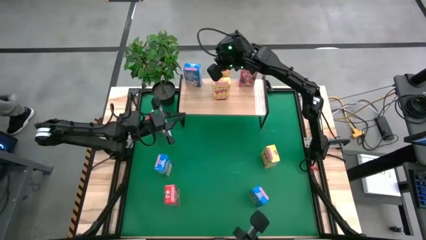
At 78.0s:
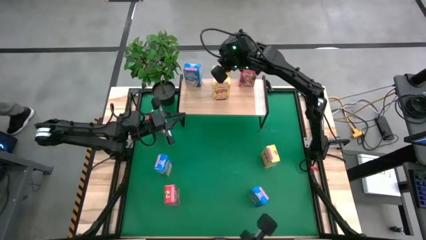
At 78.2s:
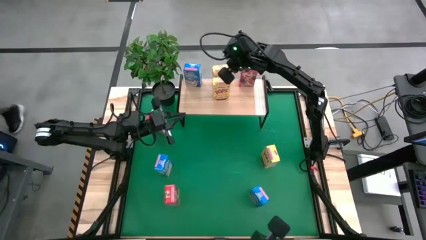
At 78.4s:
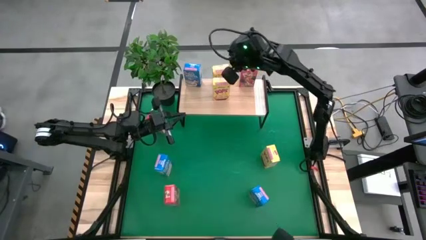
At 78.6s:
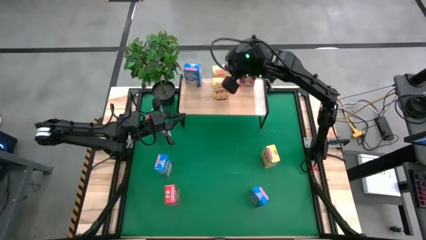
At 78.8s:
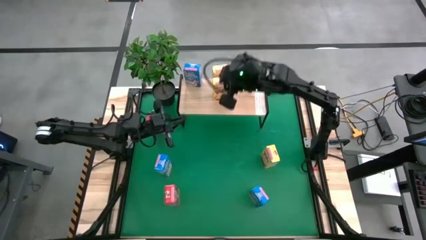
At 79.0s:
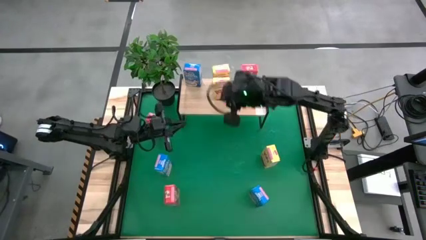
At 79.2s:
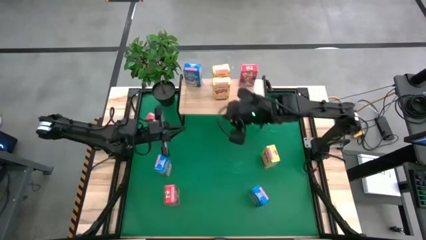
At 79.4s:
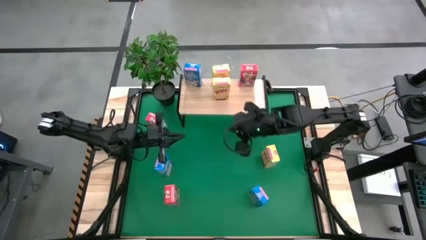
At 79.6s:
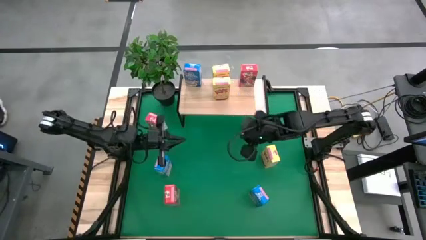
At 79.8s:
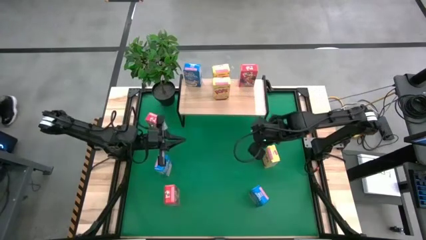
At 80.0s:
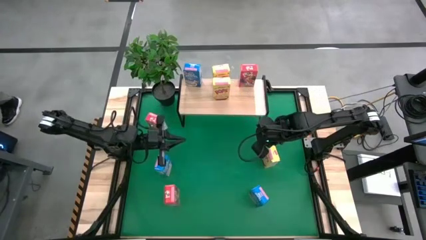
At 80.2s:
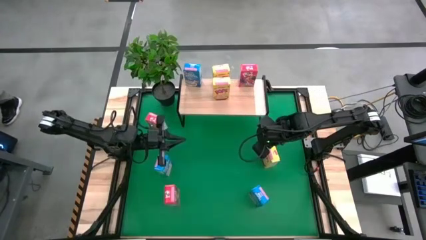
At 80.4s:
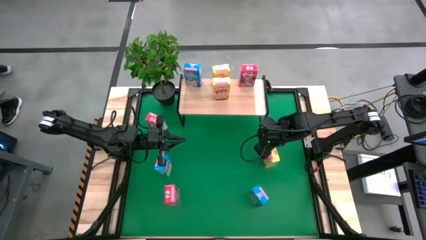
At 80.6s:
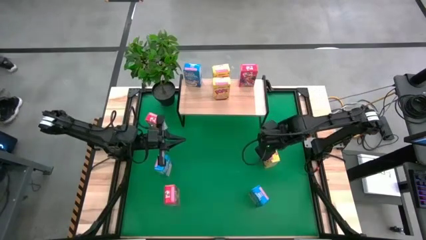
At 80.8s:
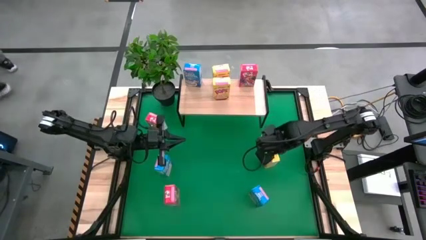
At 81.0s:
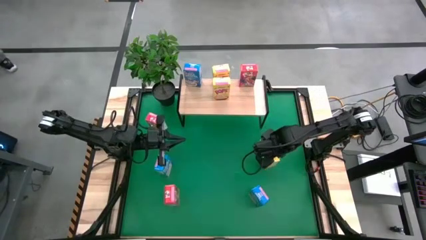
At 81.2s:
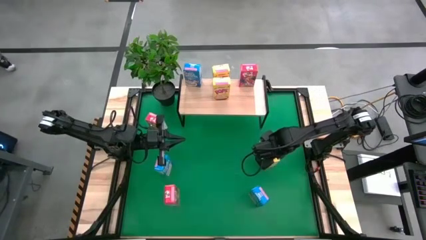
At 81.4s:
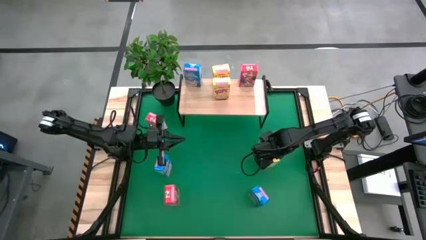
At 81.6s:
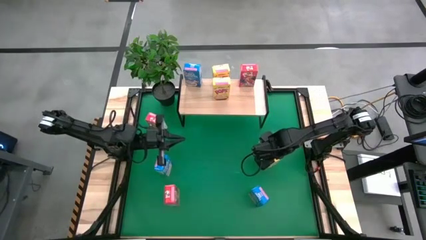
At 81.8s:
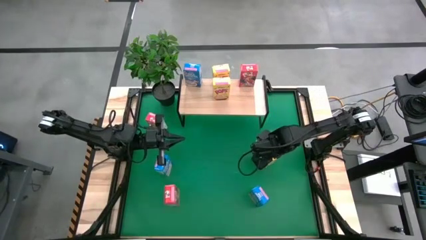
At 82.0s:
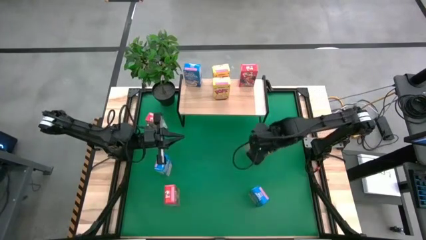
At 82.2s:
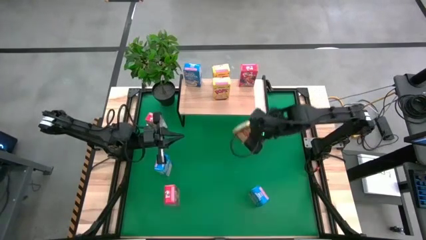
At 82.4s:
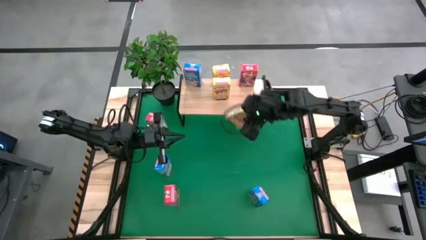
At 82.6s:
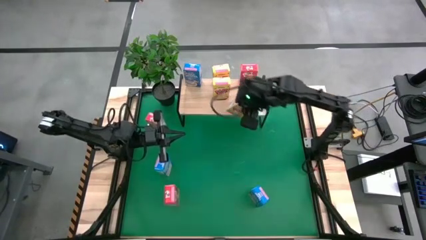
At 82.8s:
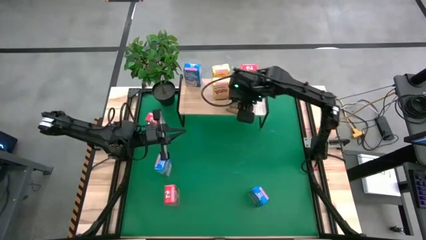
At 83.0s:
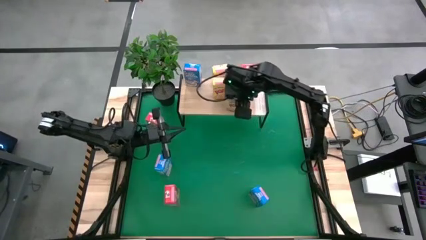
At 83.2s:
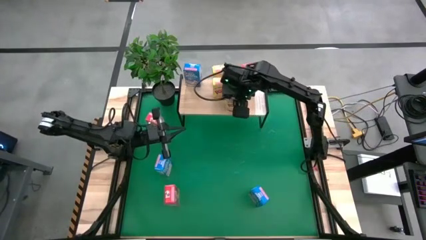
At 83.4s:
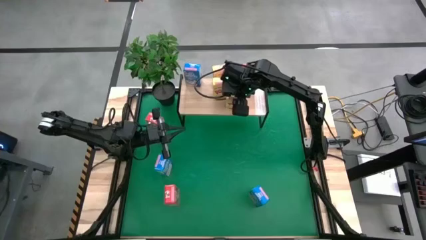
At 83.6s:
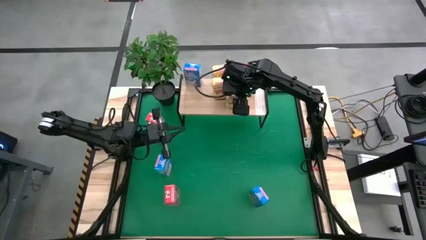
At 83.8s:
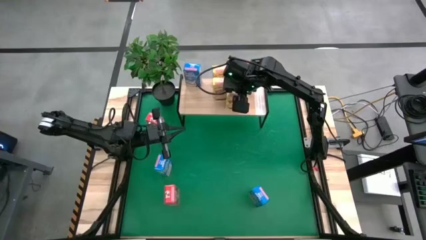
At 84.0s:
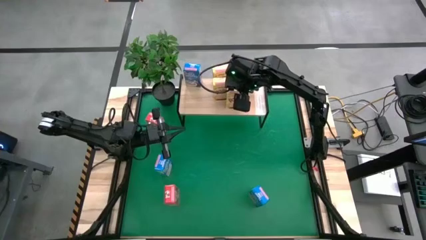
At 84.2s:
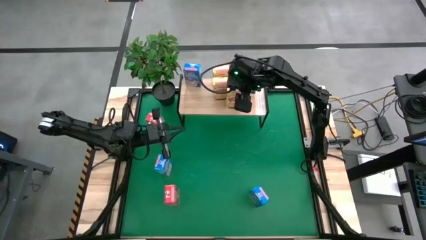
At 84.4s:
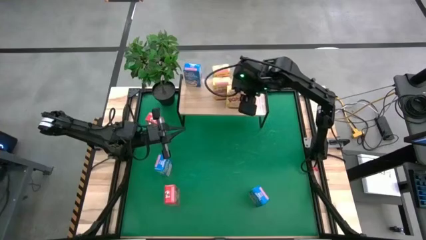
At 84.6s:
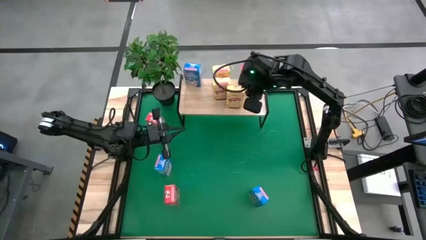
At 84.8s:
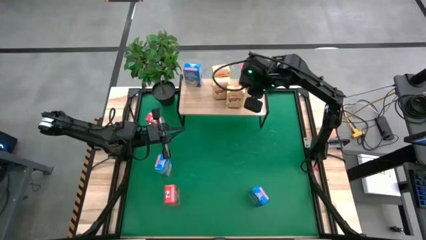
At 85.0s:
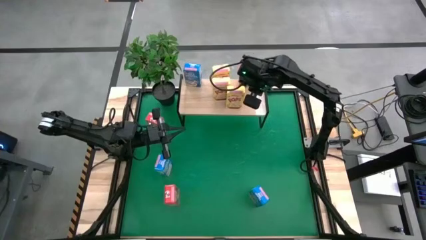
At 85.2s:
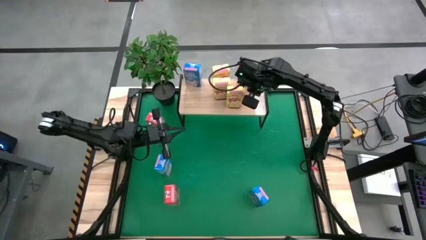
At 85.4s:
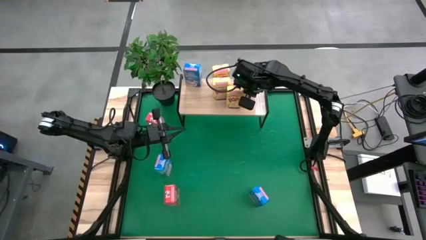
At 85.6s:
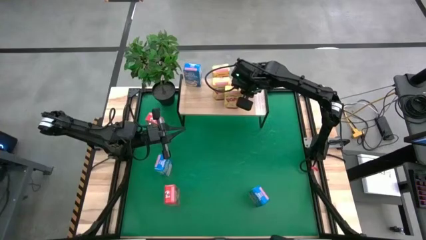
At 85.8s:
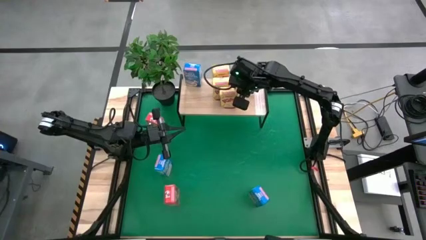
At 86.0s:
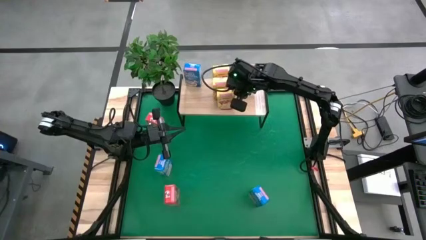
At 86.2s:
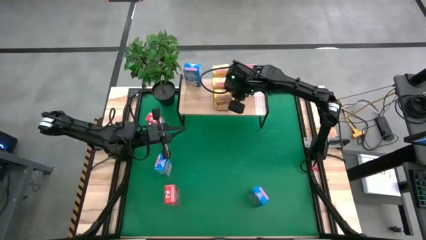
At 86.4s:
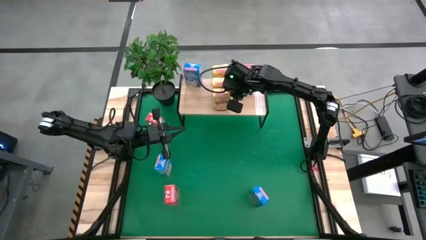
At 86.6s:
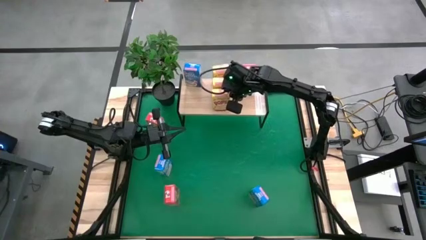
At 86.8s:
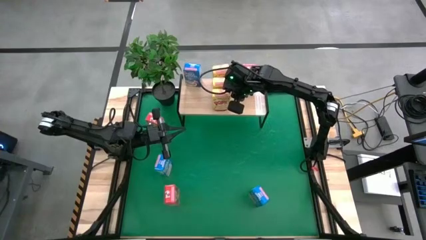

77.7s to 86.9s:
Task: Stack cereal on shelf
Put the yellow cereal box on the shelf

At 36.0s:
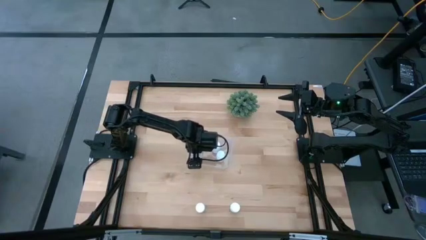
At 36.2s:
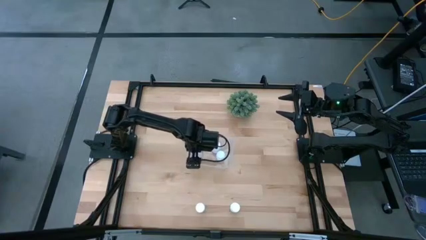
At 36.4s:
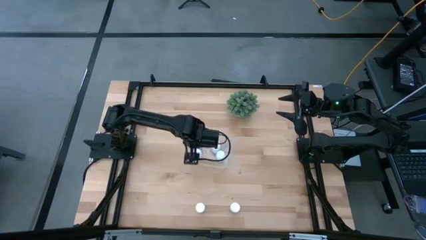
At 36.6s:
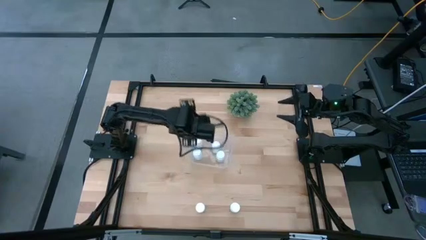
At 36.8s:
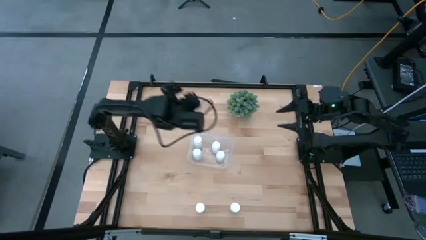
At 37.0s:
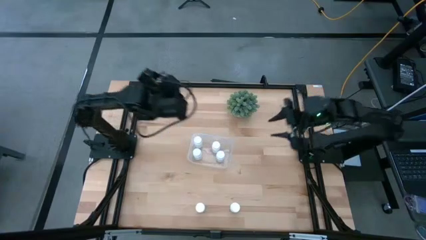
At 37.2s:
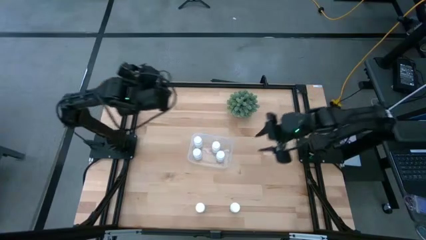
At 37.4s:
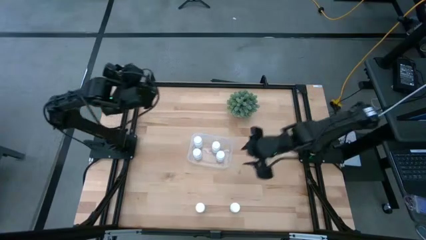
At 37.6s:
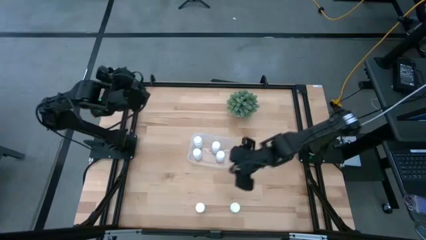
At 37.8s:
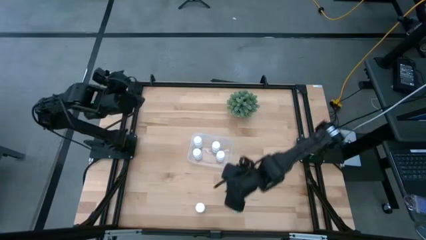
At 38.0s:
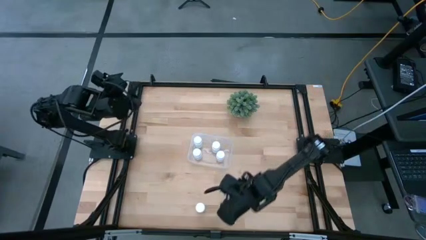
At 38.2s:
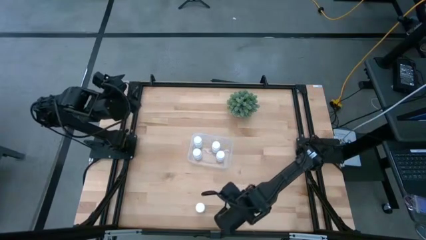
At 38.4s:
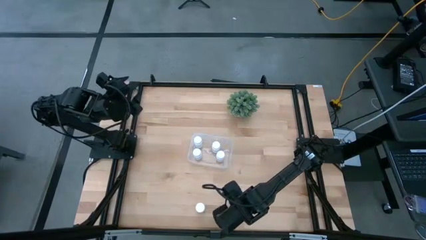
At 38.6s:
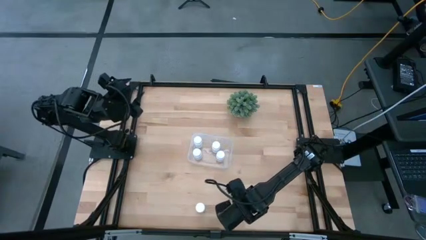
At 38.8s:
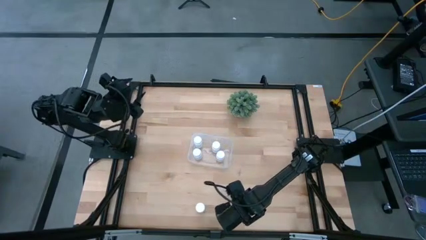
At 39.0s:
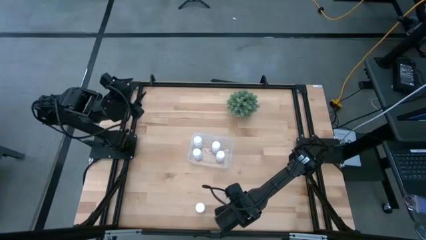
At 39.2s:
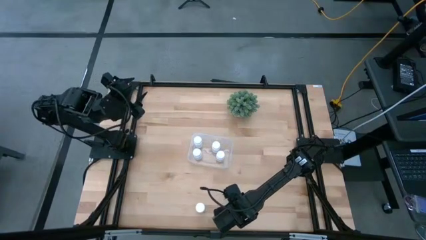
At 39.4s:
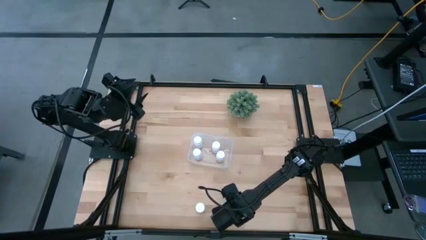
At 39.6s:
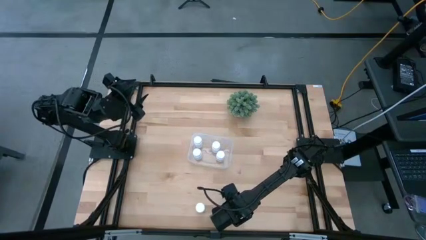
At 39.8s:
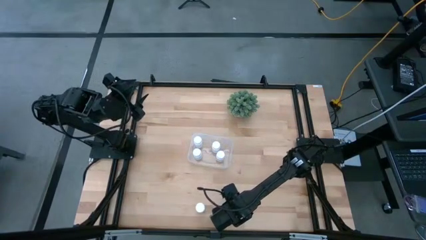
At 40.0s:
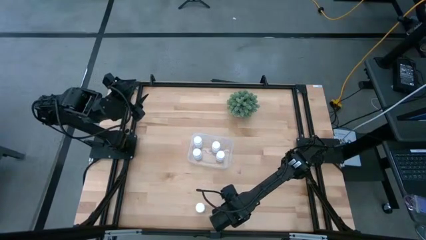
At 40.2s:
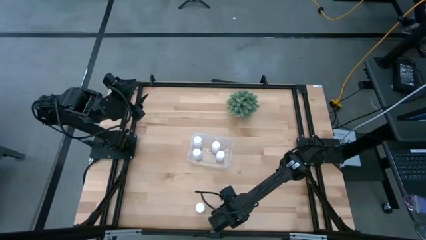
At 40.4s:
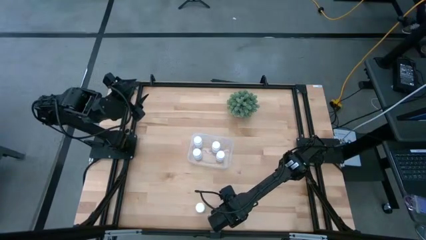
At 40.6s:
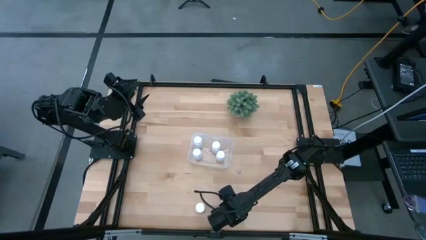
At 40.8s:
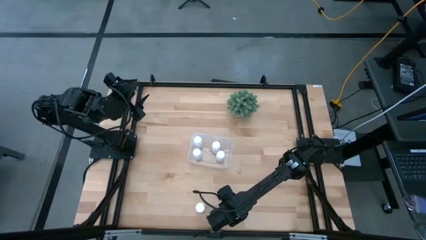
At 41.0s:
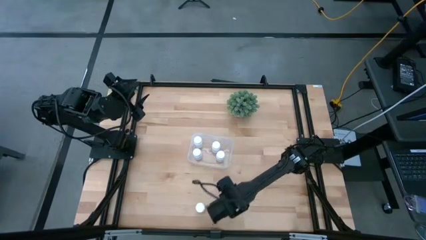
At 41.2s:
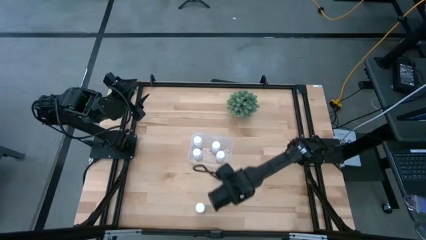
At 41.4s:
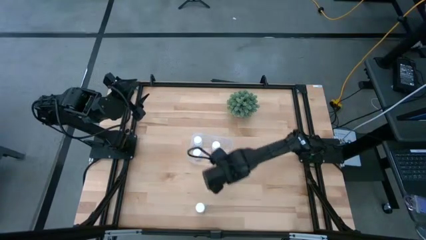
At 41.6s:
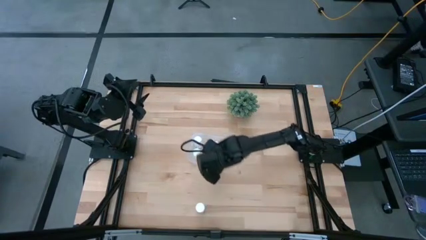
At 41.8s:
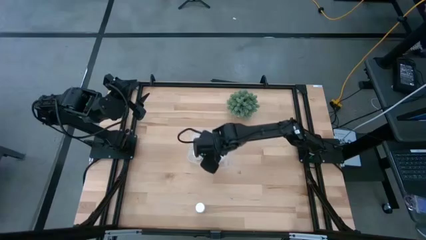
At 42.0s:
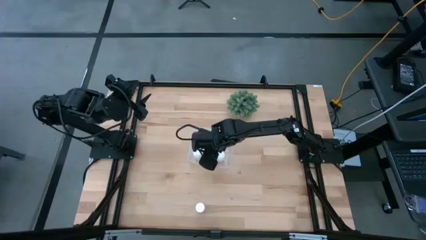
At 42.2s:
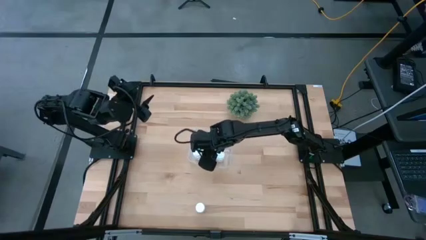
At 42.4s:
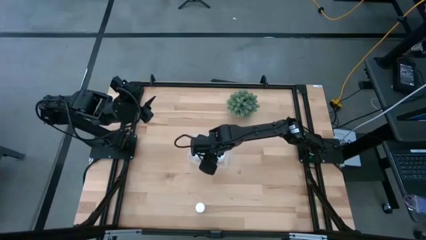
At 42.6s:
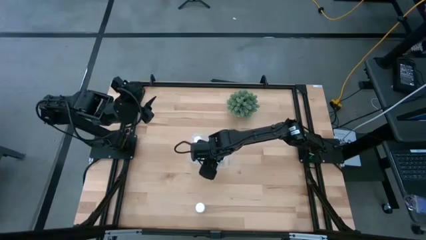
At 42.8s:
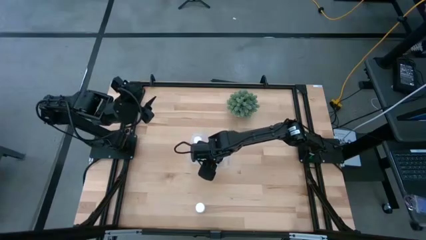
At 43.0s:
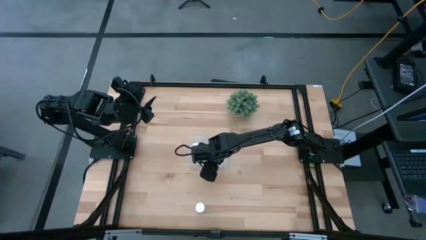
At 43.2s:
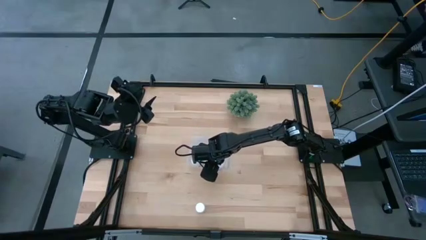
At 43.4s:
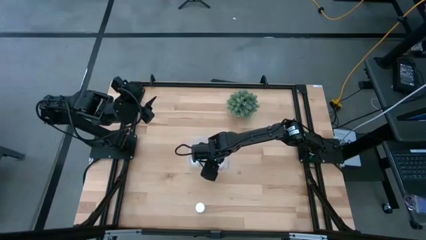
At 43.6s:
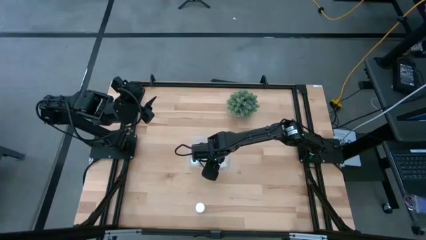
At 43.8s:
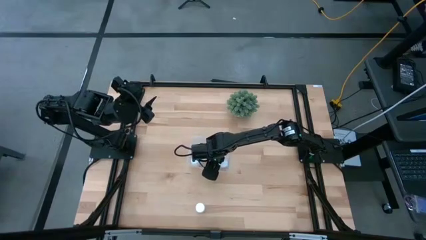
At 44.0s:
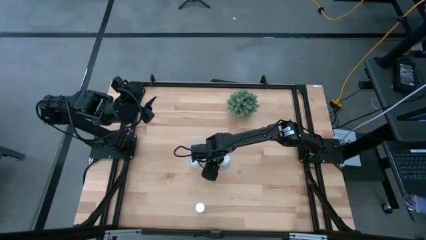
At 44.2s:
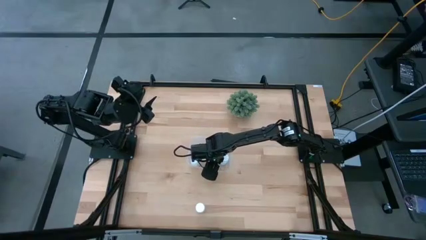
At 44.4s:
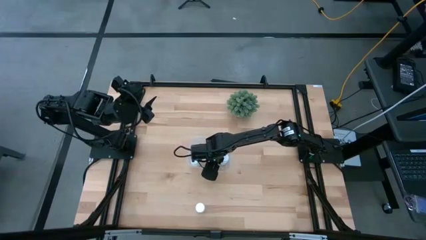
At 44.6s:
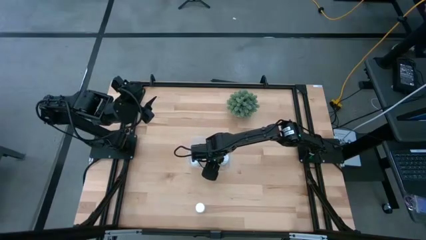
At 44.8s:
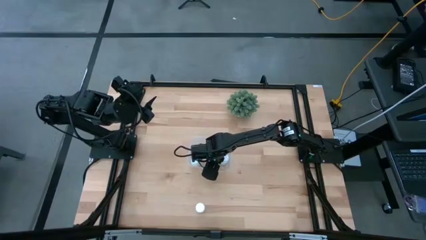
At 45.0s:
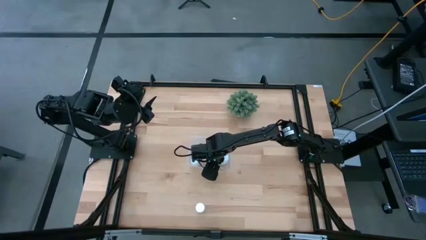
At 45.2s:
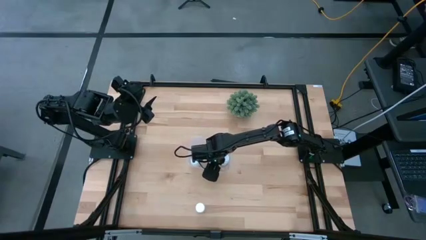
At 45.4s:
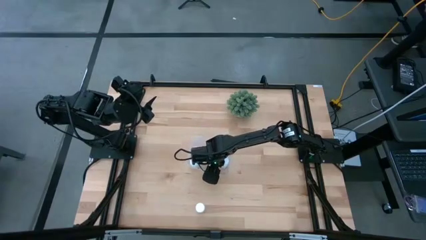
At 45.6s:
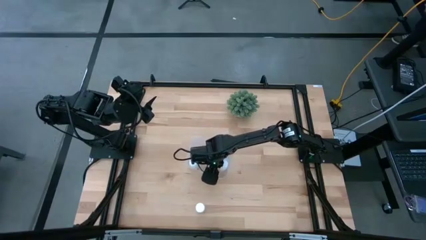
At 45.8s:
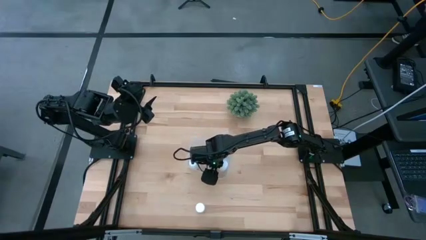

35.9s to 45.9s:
Task: Pick and place pill bottles into a basket
Put the white pill bottle into the transparent bin
